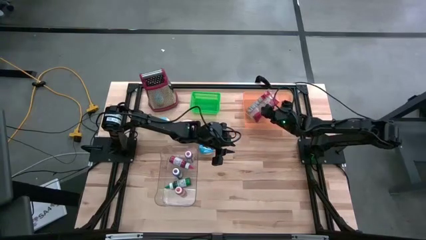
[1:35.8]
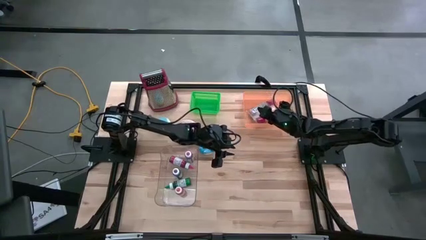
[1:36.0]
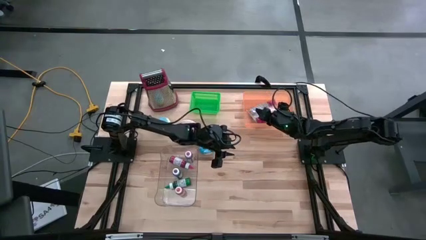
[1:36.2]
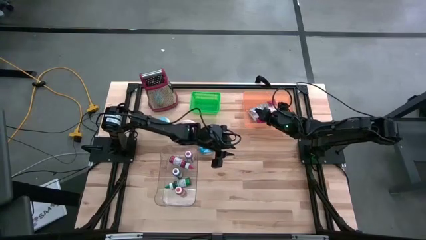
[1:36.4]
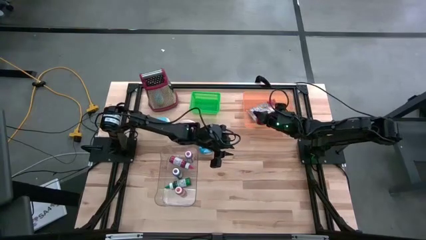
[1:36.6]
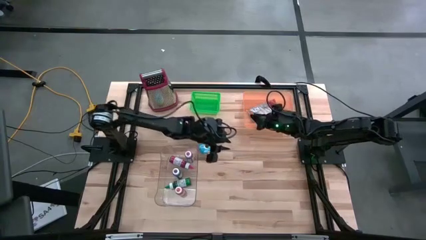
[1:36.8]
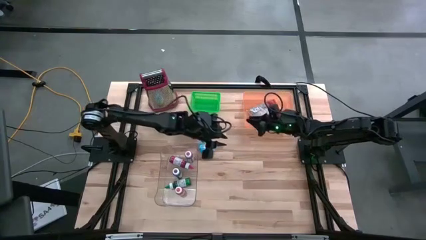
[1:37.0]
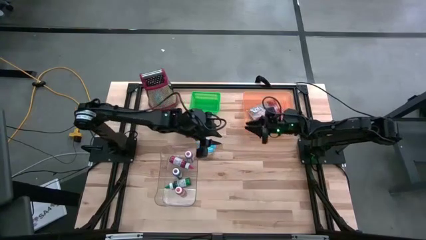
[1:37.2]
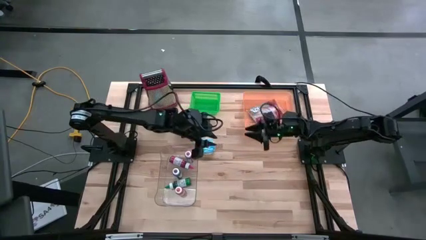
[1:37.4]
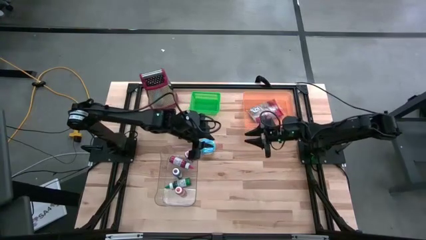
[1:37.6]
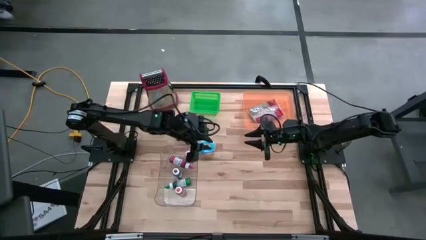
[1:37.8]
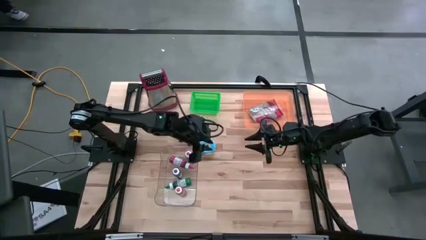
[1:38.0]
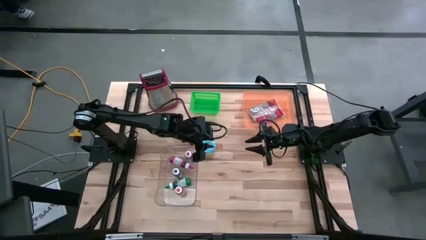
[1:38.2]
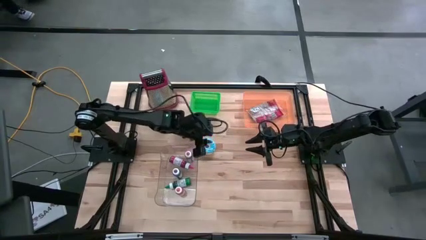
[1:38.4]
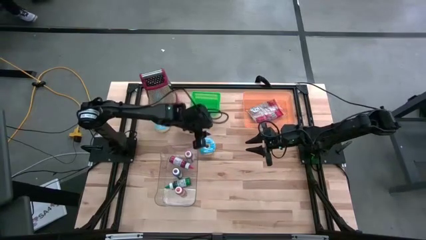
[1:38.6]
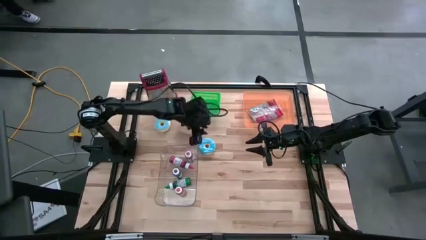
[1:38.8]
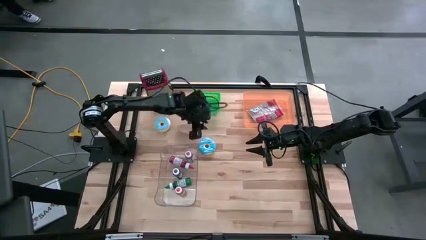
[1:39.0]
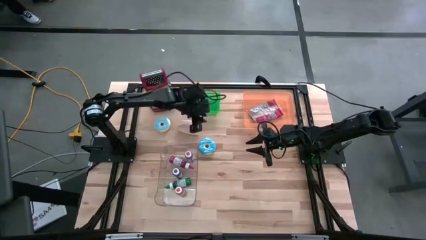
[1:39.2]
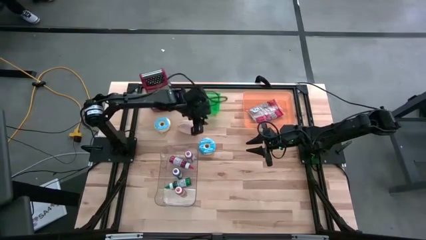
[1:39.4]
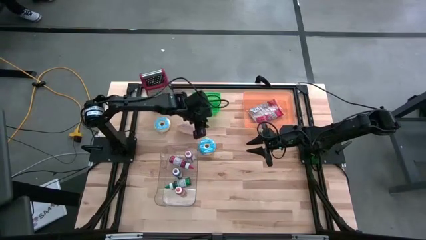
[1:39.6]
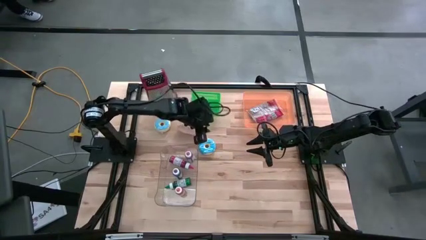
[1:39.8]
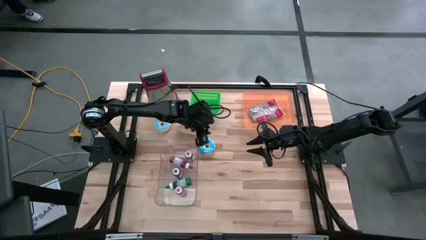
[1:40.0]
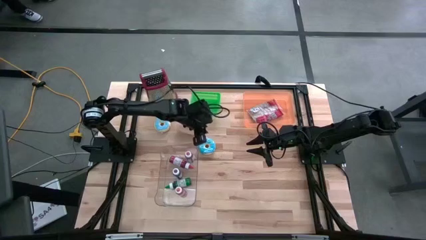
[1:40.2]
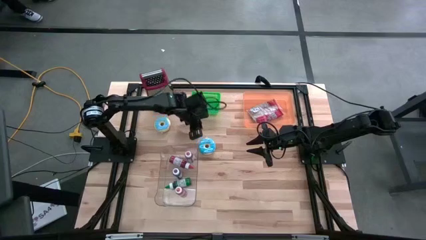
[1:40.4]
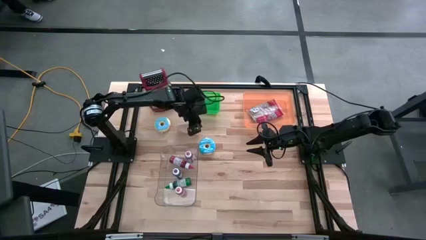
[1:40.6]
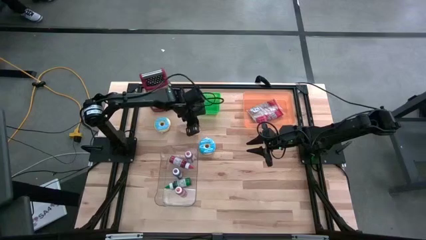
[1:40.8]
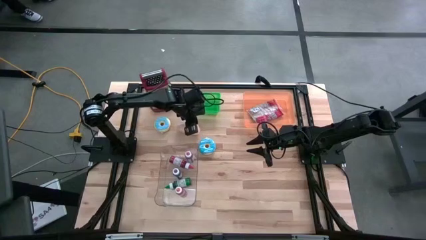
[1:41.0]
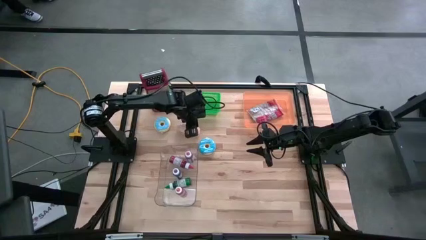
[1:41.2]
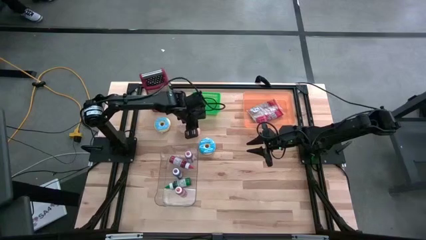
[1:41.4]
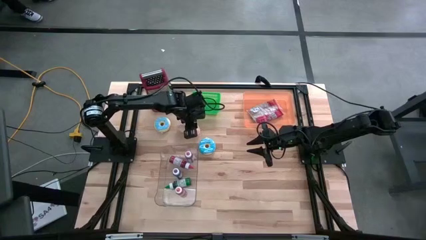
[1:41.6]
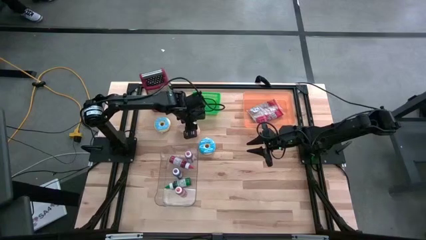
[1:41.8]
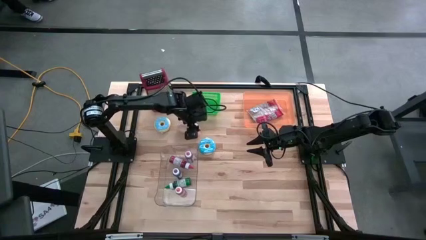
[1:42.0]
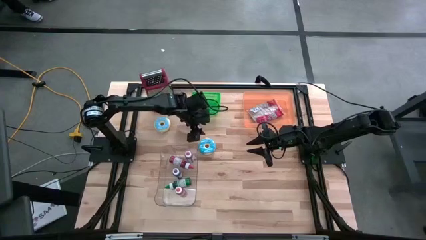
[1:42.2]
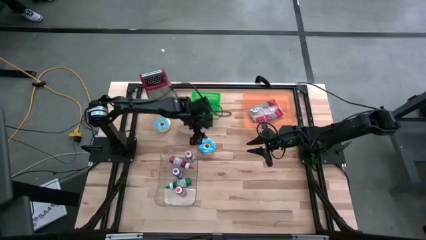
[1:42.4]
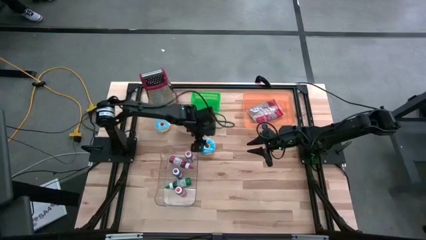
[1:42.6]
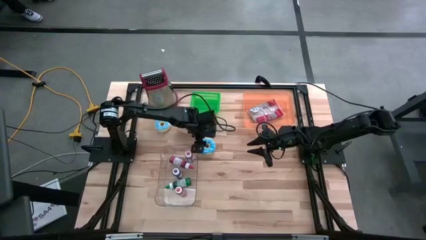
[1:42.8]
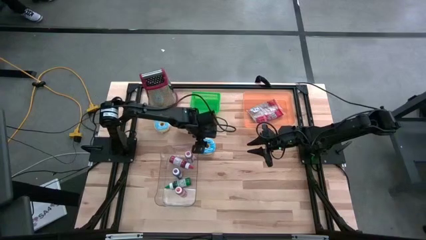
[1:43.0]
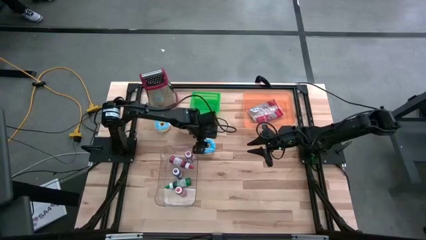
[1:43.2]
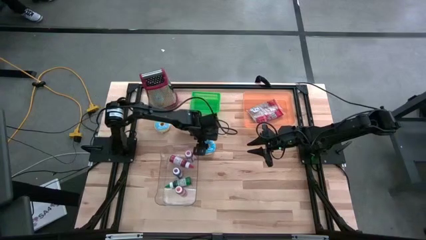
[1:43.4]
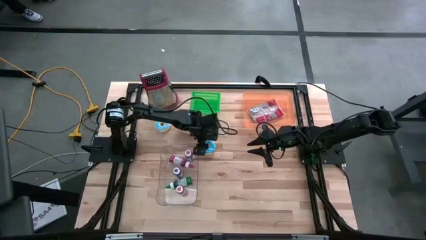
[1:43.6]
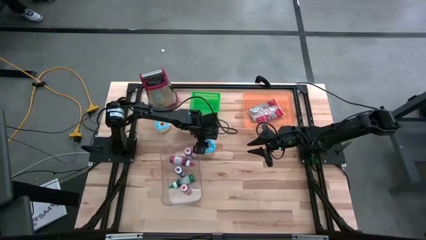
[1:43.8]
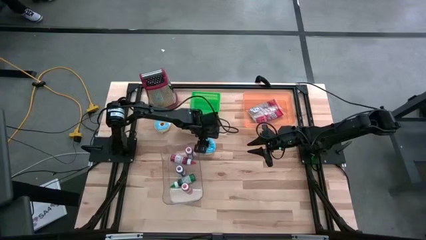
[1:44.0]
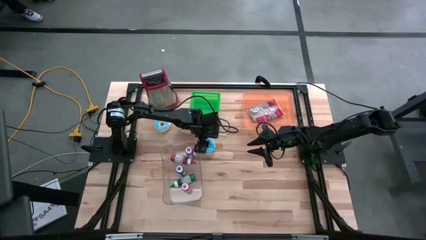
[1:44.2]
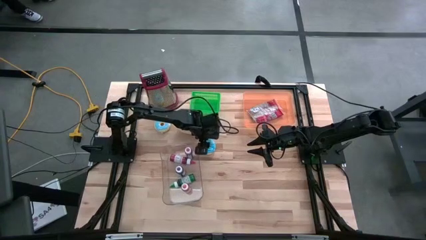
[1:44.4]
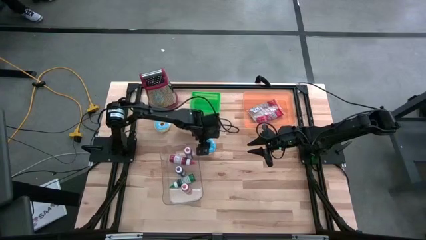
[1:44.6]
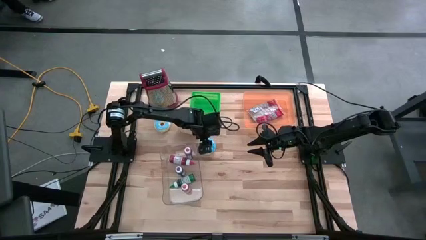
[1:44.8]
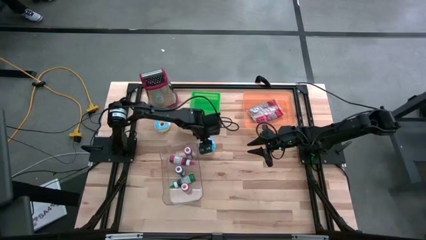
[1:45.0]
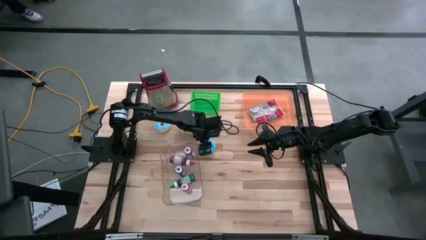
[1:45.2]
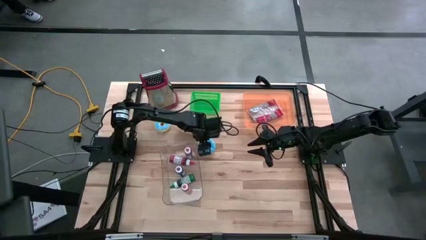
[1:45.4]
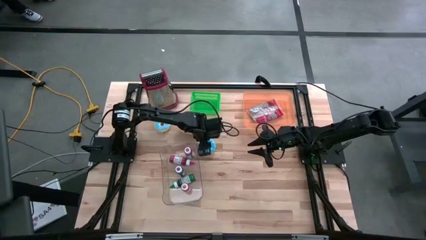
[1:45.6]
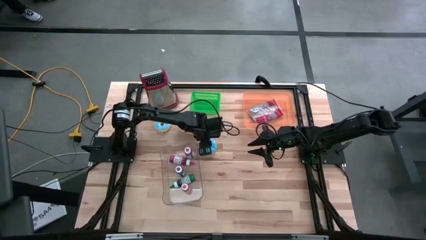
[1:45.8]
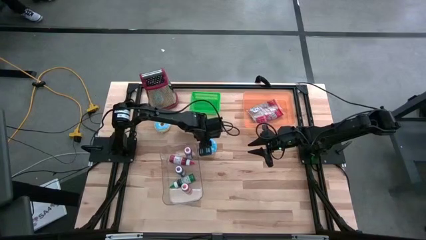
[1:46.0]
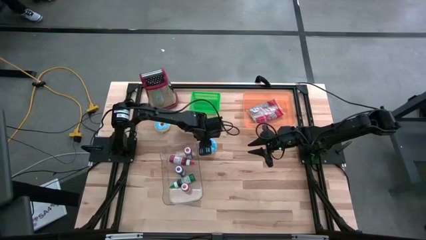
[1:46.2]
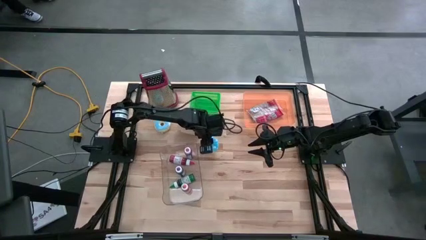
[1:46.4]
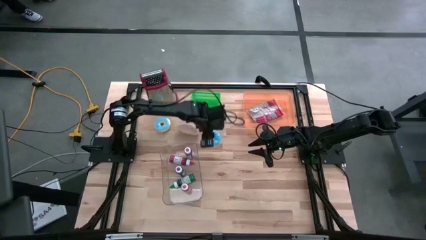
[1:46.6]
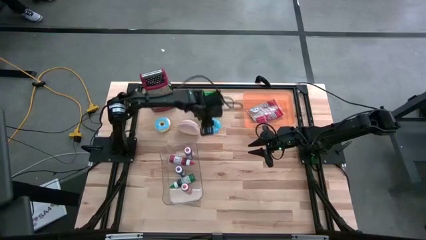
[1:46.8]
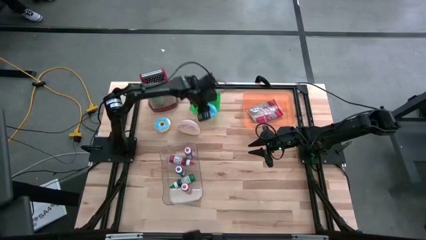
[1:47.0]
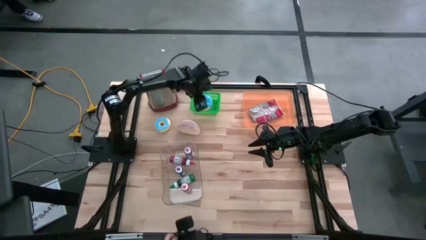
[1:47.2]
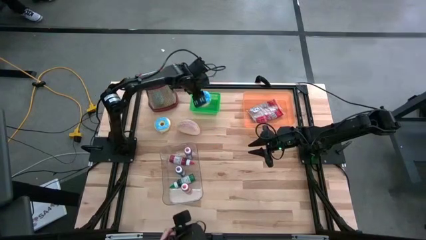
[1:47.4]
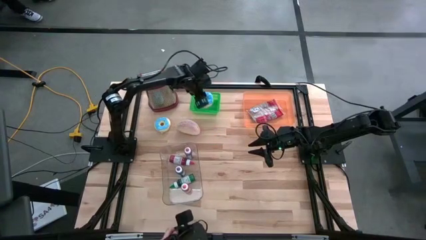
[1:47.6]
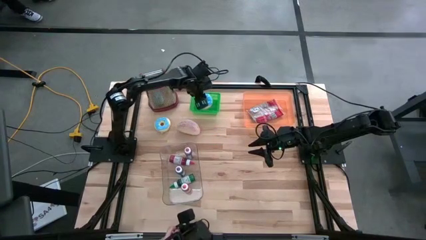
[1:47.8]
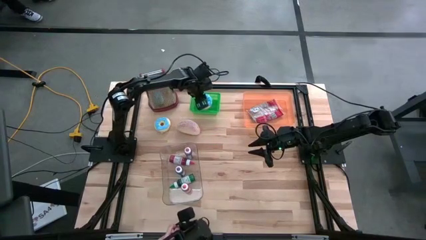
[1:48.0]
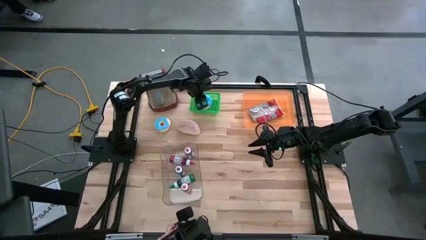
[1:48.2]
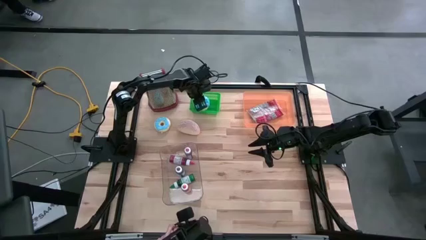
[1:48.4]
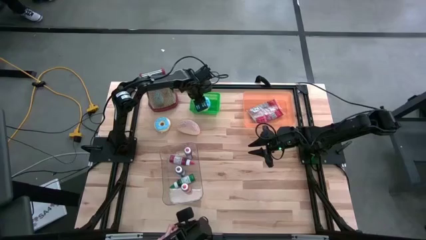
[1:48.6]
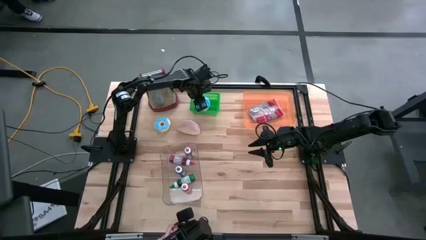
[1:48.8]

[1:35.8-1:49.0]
Put the bottom blue donut into the green bin
